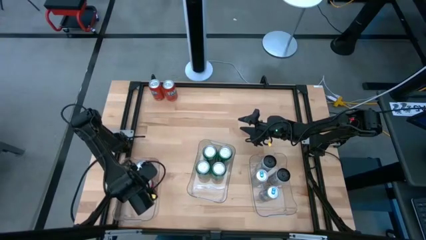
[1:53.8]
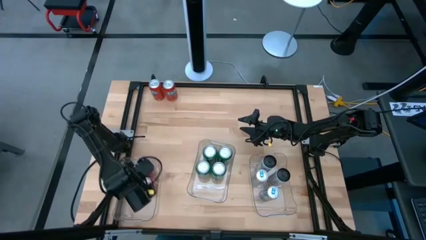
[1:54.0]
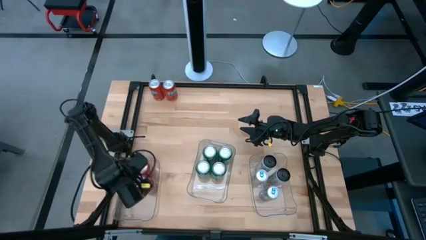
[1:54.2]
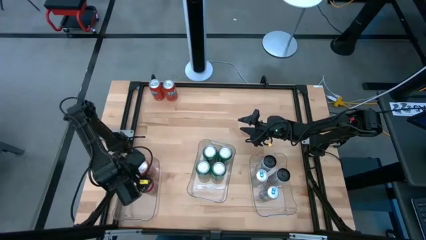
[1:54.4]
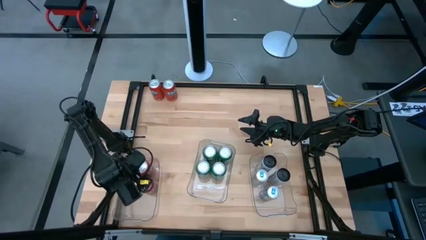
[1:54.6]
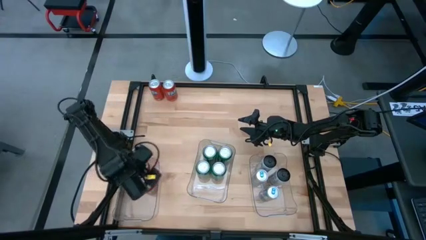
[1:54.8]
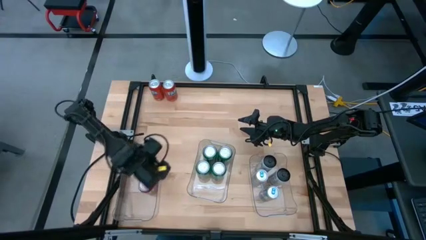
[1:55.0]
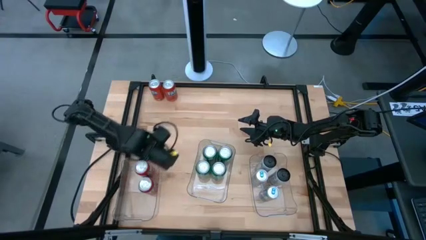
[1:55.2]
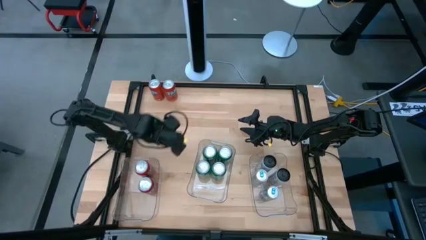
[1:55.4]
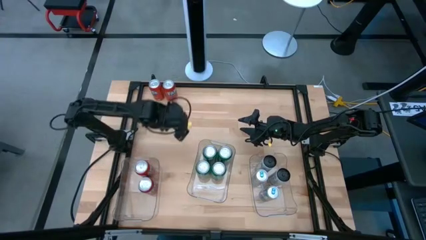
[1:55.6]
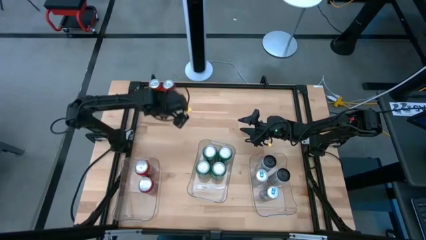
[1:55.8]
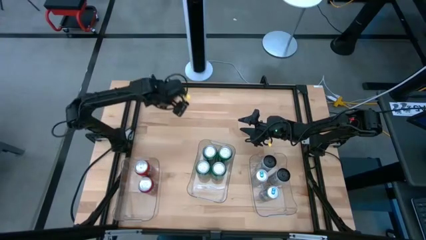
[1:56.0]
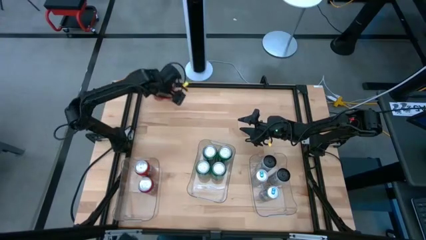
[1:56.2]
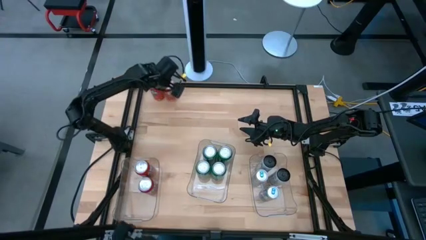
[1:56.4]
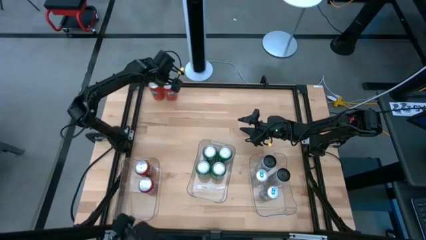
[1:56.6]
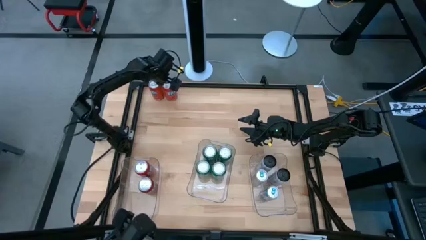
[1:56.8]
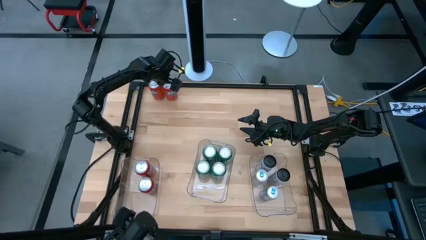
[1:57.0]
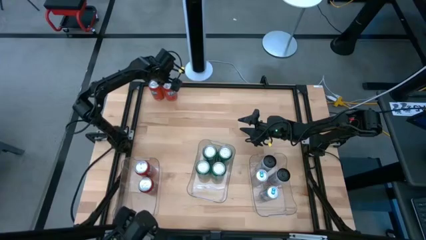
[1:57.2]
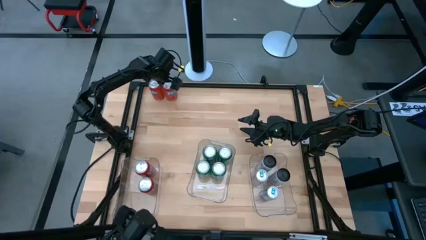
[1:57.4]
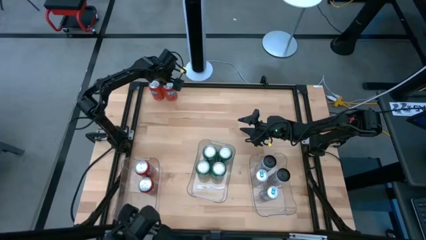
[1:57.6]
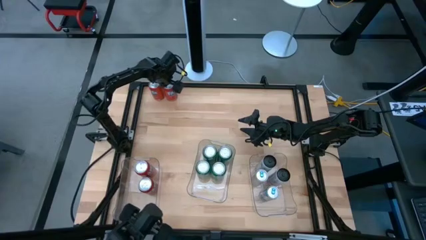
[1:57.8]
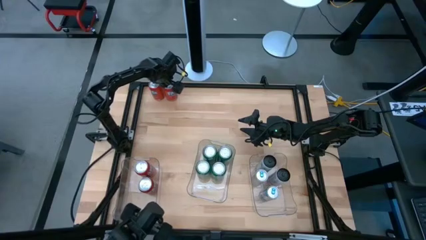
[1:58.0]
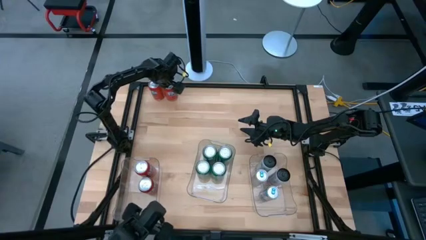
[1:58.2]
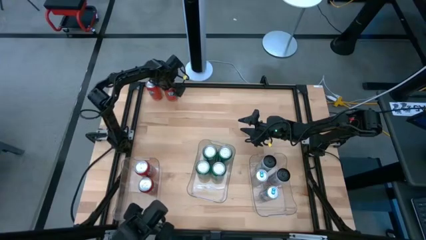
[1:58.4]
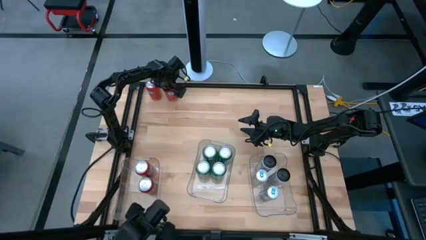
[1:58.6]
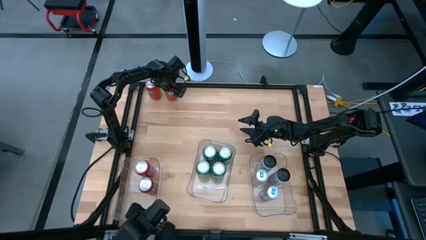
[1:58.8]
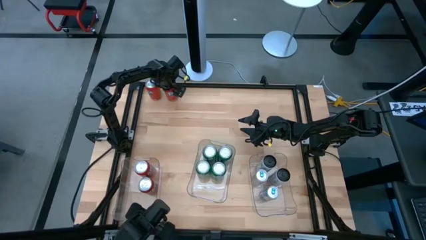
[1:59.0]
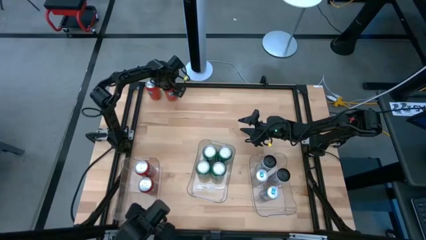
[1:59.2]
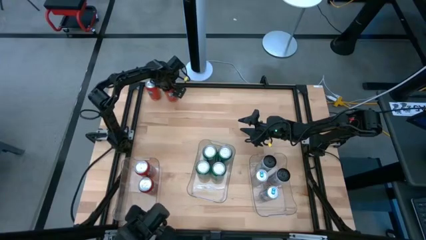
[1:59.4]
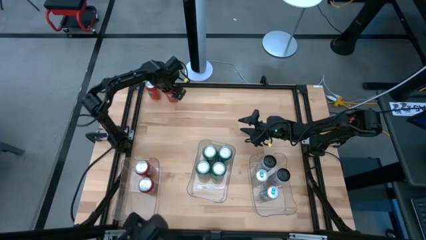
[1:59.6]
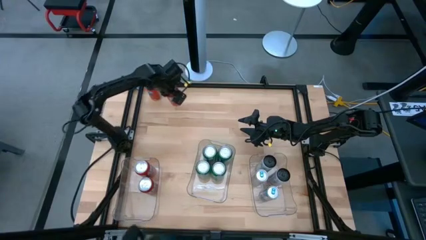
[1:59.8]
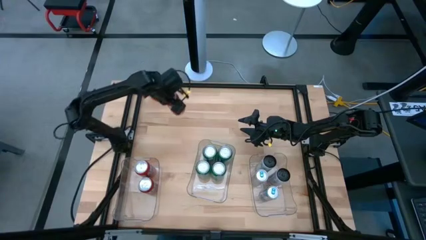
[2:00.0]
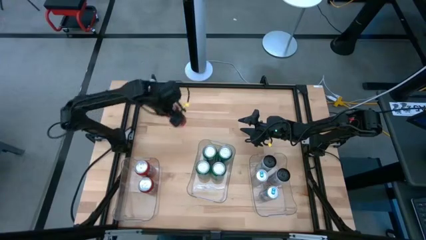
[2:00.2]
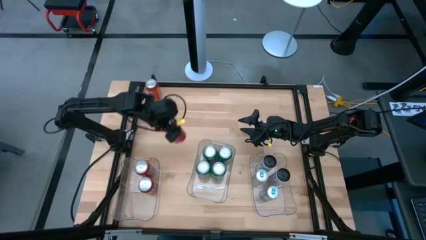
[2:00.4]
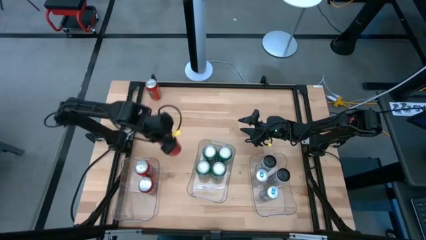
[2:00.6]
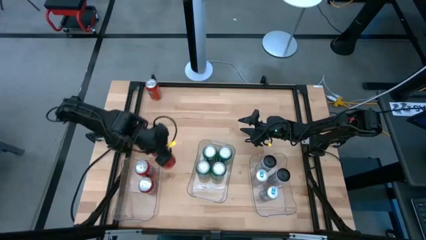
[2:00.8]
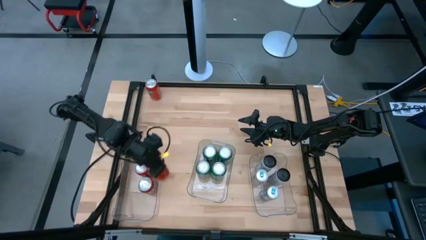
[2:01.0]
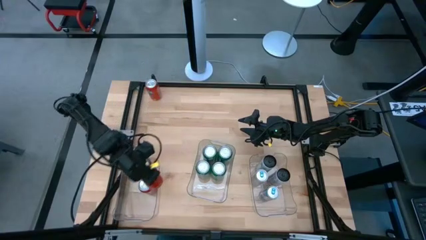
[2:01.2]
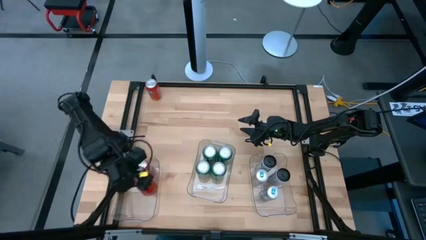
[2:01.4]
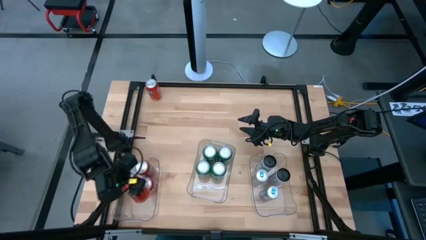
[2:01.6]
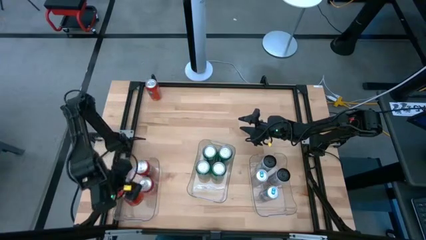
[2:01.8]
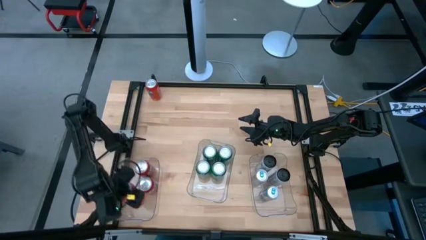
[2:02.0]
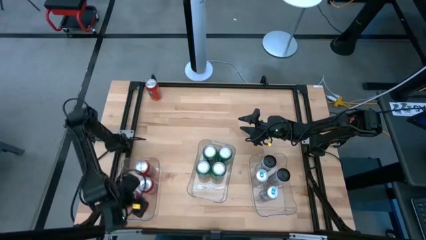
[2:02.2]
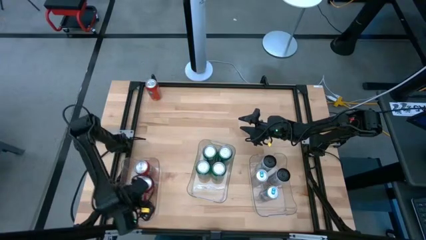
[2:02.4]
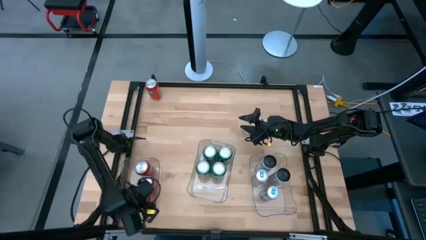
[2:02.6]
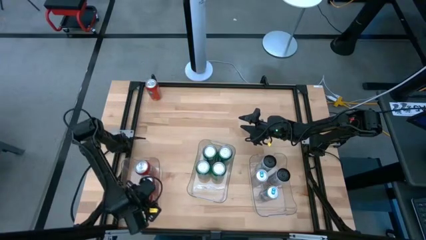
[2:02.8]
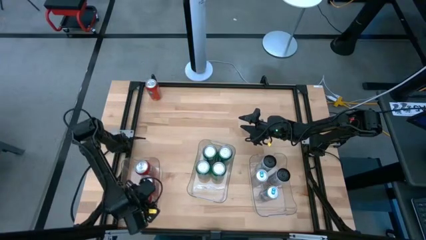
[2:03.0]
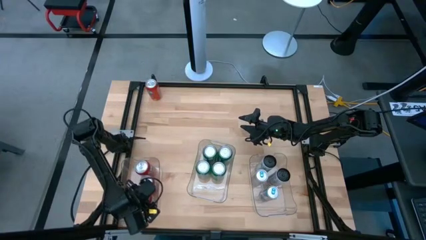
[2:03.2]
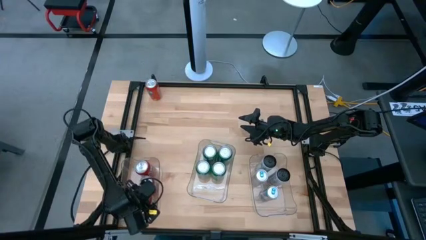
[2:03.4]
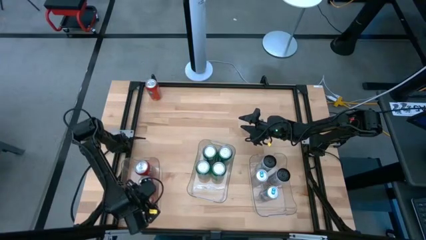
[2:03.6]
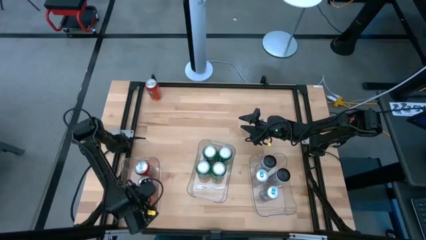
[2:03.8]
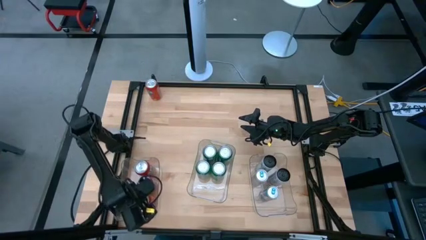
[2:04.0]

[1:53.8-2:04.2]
Task: Sort soda cans
Put the red soda can into the left transparent bin

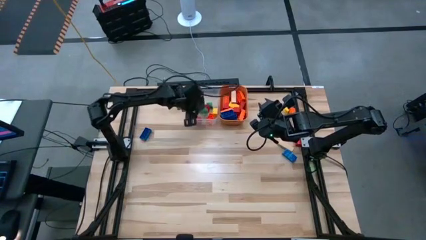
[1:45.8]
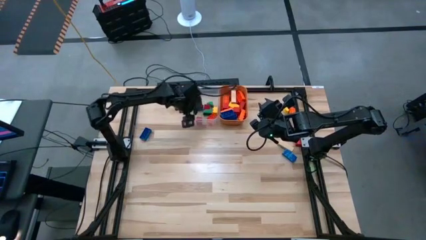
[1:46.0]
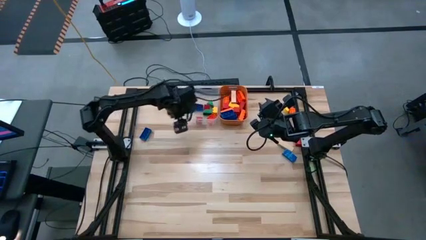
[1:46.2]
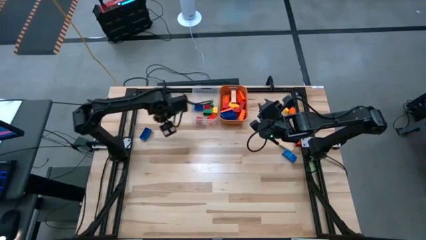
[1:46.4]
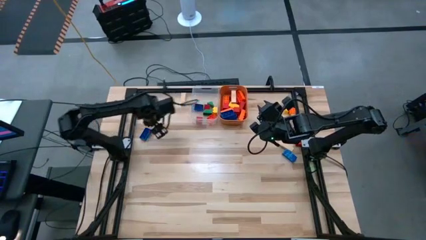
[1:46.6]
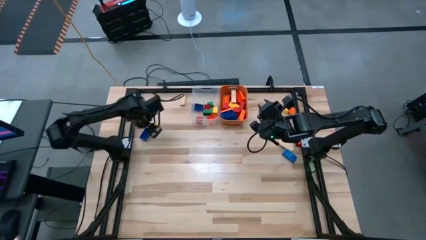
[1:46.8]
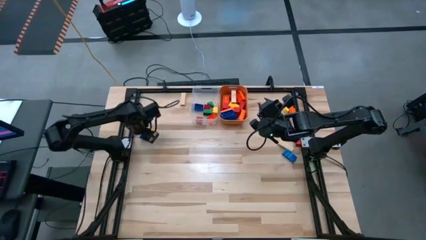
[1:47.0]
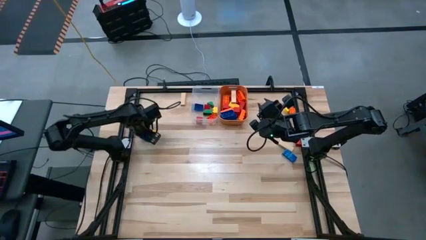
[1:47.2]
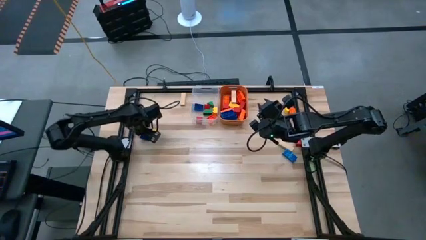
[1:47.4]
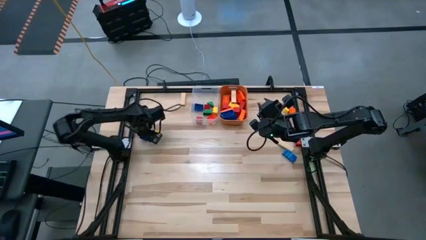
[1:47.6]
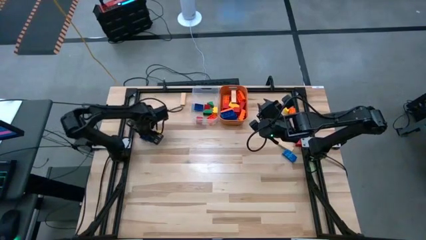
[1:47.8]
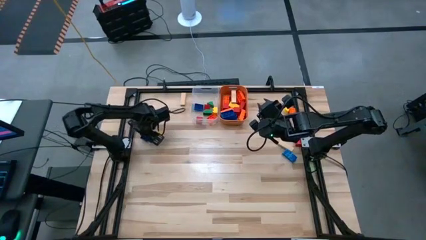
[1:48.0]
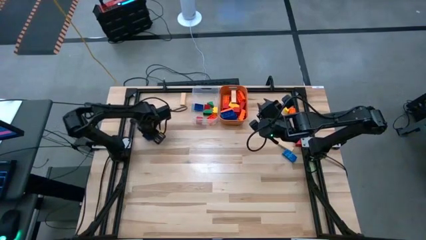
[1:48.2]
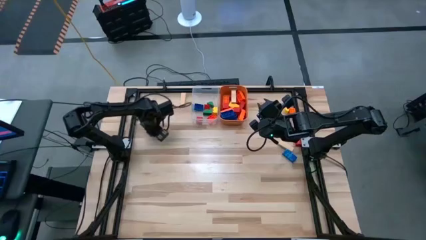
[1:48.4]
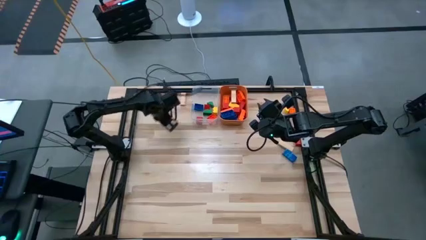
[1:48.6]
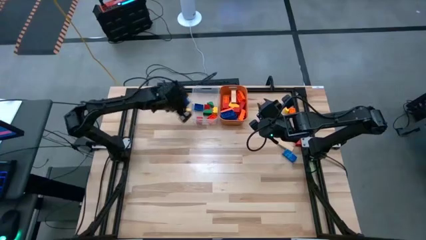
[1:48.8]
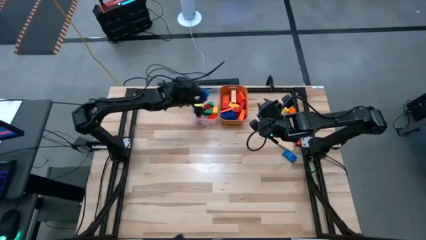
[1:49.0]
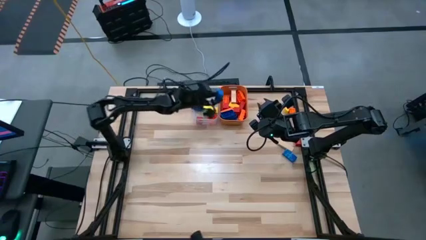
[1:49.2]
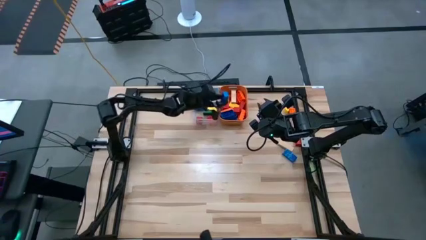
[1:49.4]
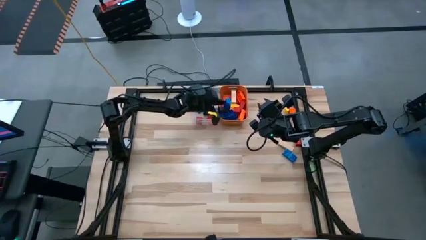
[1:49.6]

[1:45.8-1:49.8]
Task: Sort blocks by size
Put the blue rectangle game piece into the orange bin

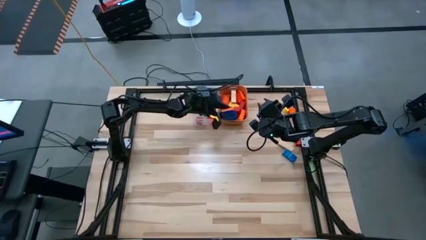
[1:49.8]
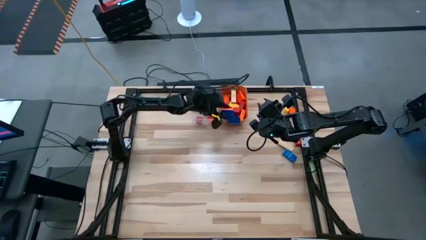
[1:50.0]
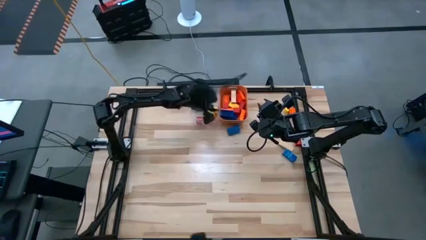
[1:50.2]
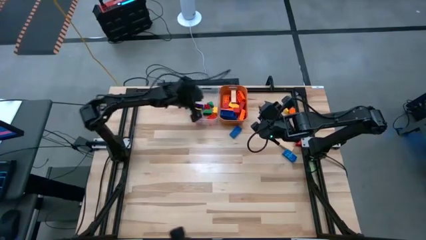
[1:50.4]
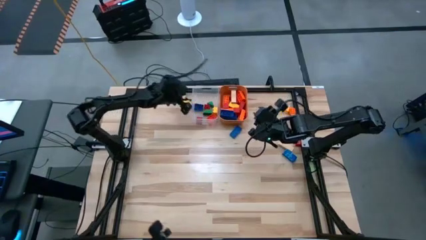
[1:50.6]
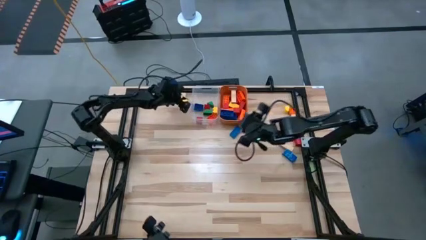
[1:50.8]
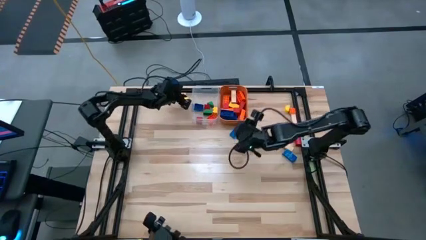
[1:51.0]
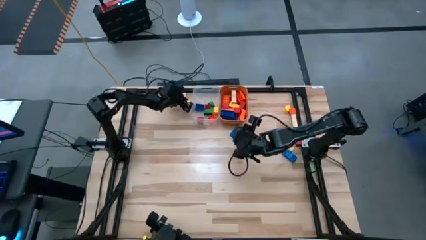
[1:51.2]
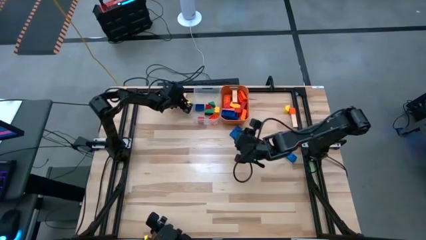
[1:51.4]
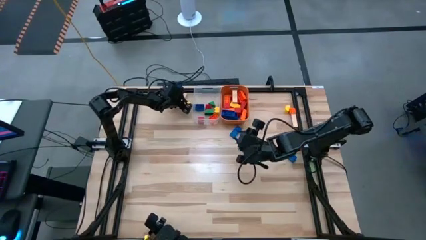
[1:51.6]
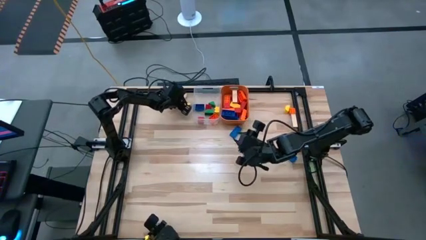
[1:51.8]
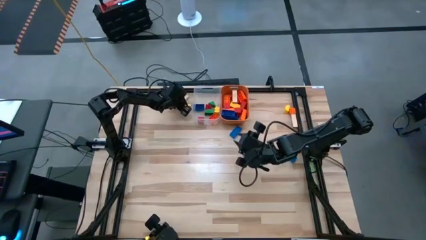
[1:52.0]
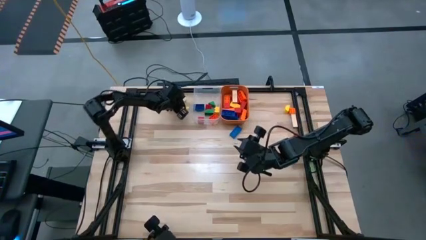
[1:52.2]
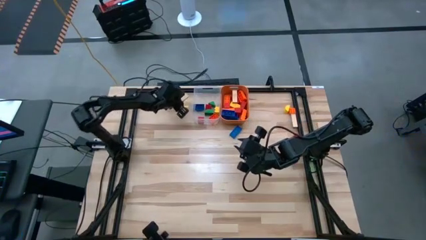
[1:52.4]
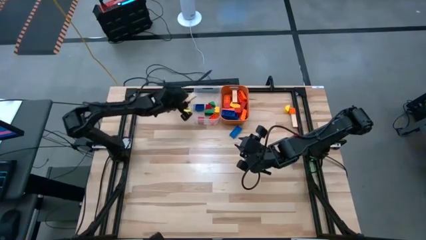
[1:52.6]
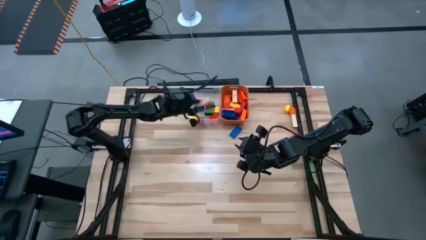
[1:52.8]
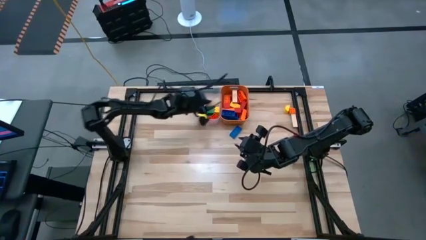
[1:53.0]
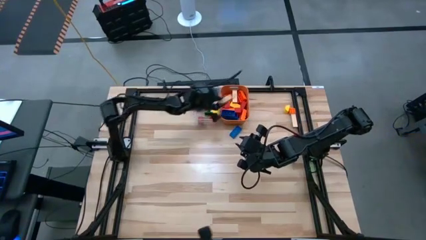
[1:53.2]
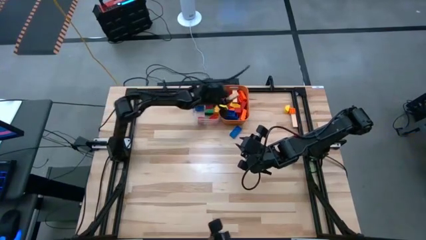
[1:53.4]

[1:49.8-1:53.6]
Put the wood rectangle block into the orange bin
